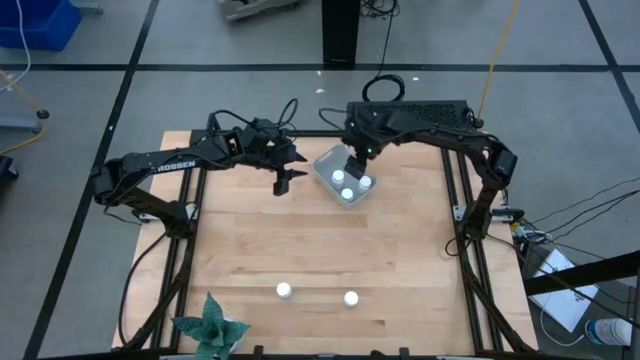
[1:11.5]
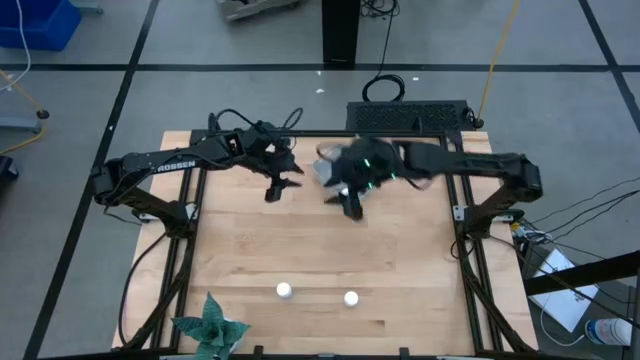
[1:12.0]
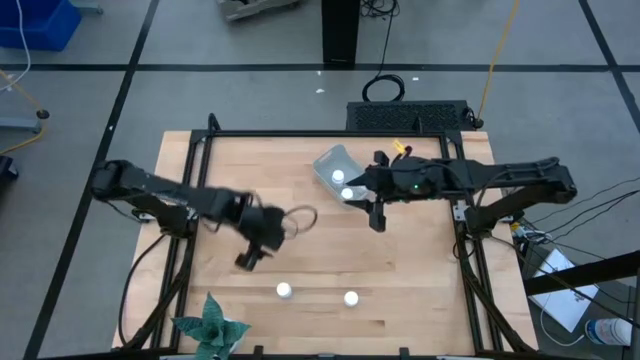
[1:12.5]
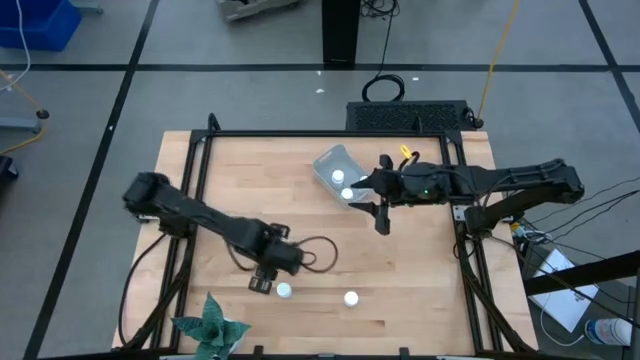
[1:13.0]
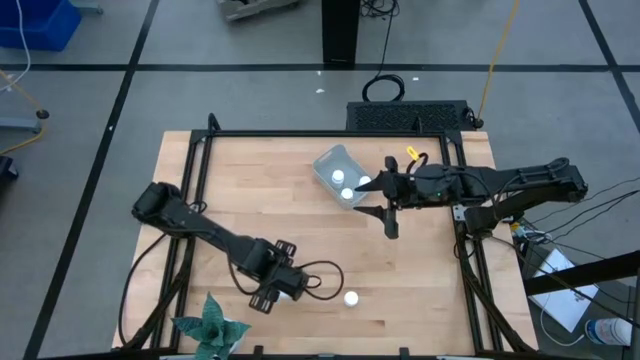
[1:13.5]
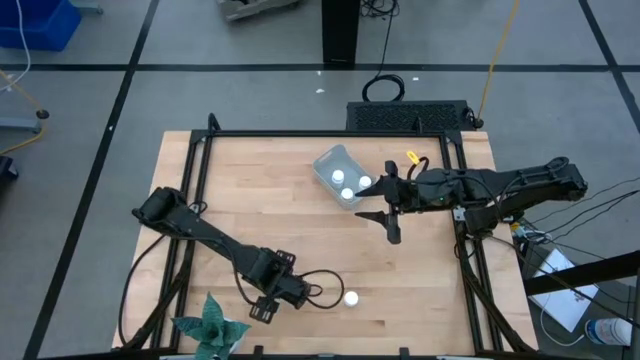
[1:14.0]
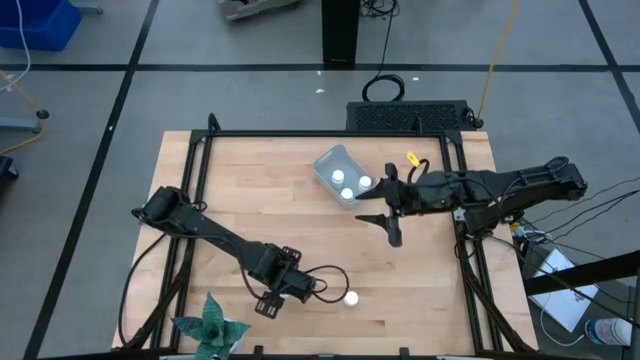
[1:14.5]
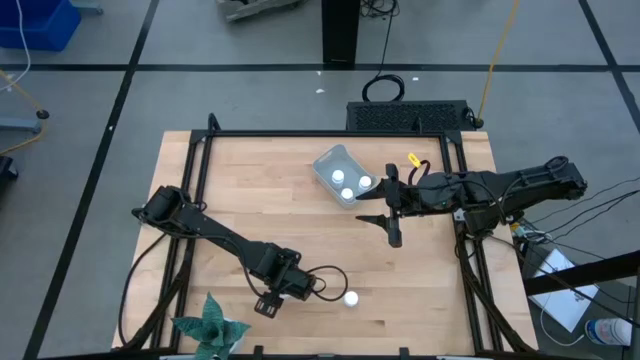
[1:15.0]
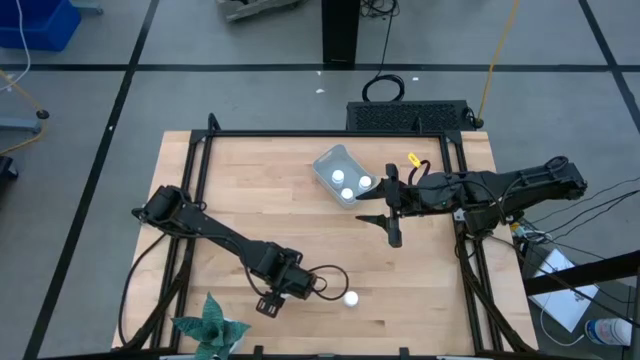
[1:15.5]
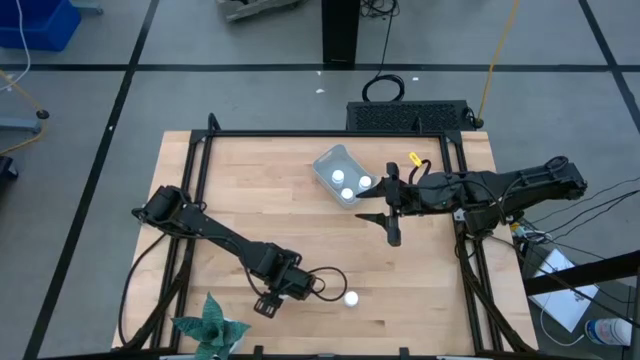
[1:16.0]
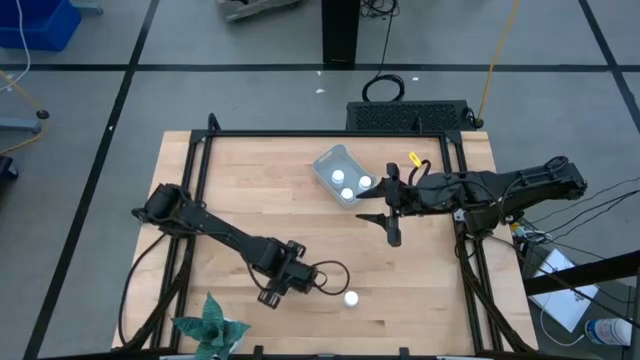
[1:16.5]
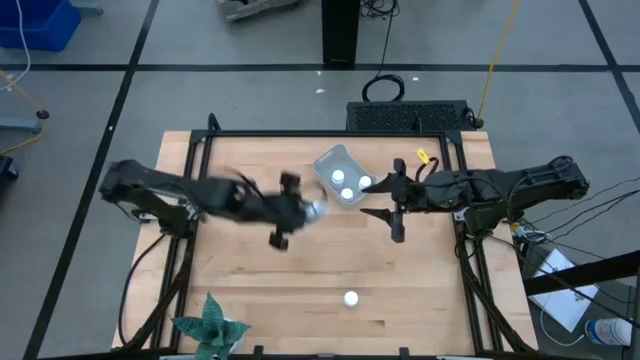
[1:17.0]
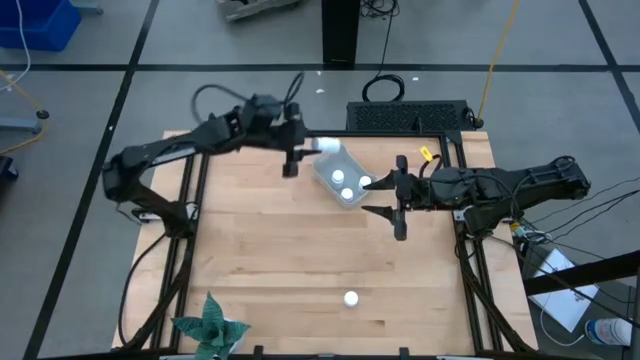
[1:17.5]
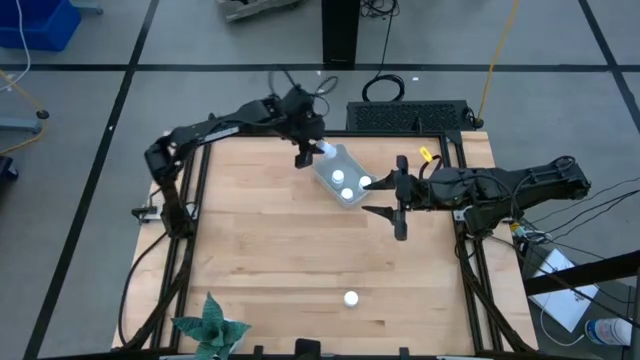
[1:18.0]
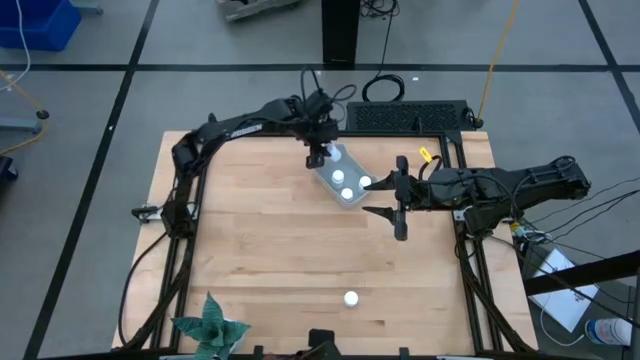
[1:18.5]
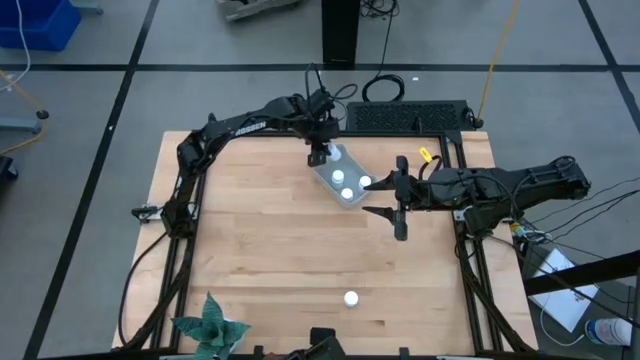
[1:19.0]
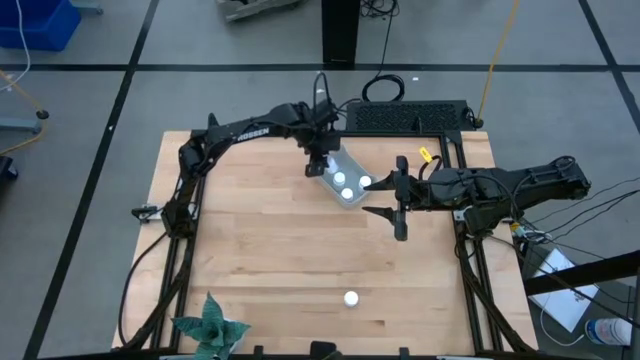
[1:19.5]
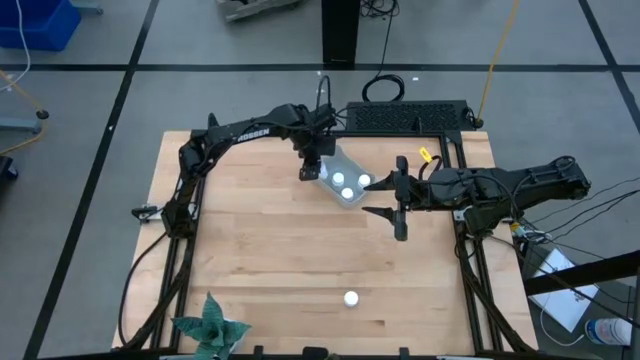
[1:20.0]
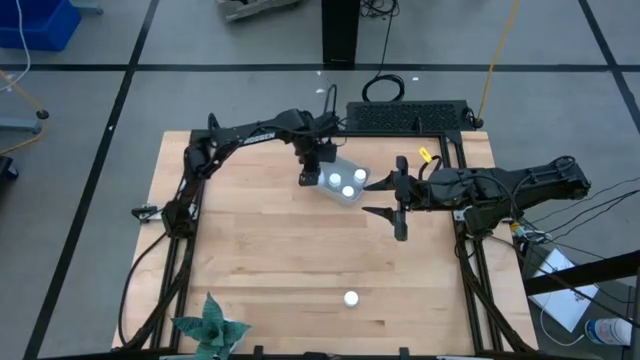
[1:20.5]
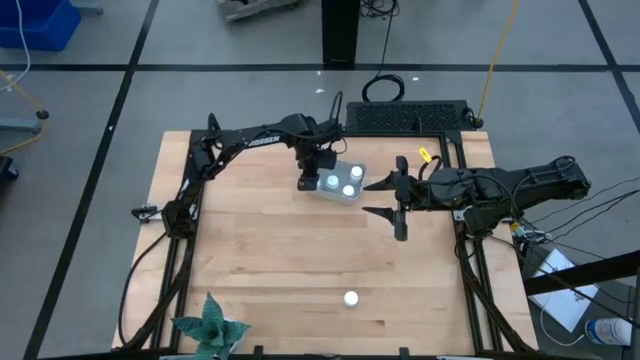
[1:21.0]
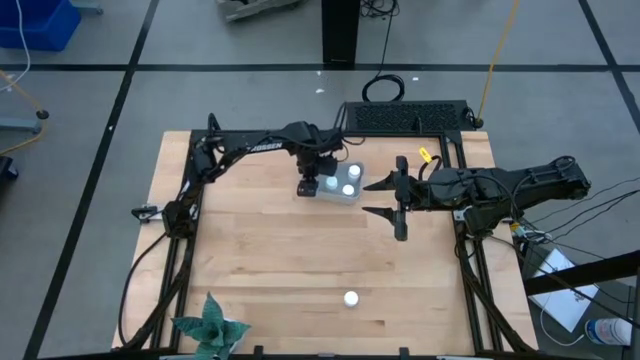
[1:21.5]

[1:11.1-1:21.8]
Task: Pick and place pill bottles into a basket
Put the white pill bottle into the gray bin

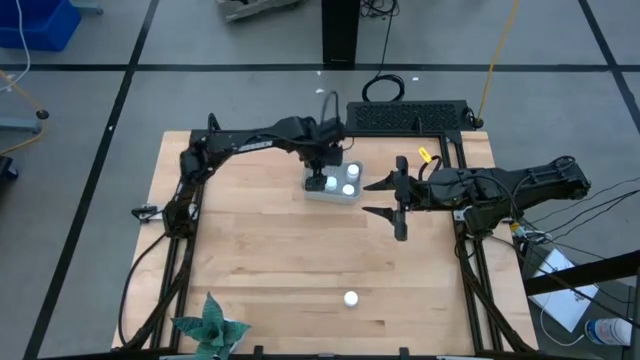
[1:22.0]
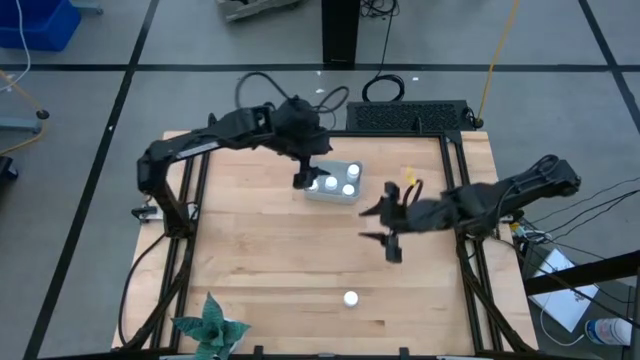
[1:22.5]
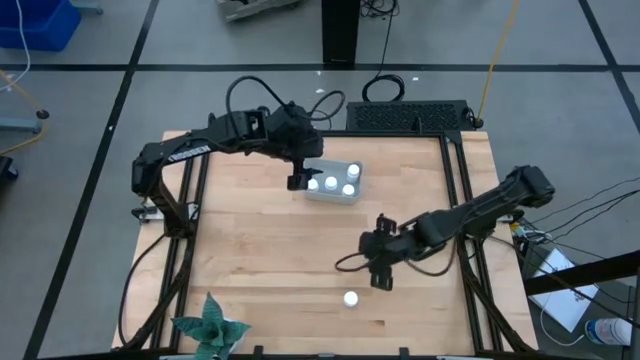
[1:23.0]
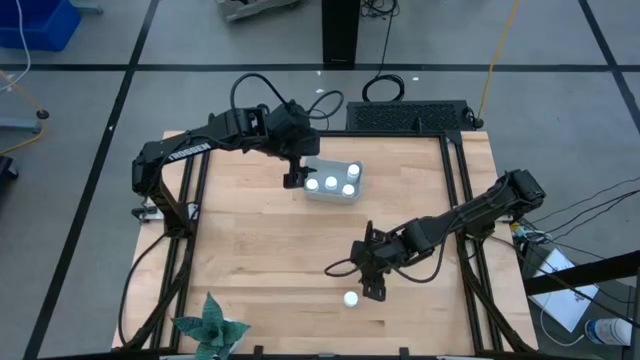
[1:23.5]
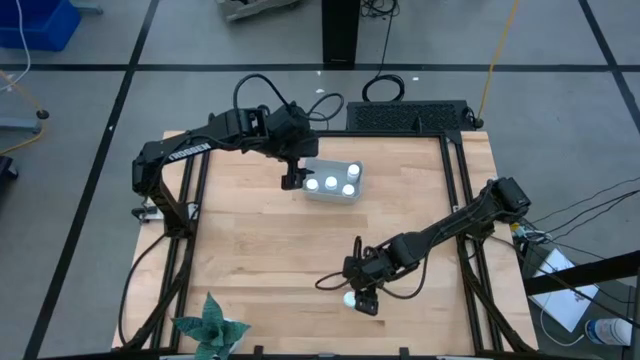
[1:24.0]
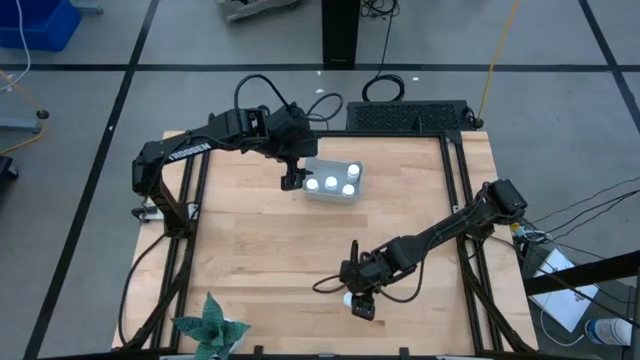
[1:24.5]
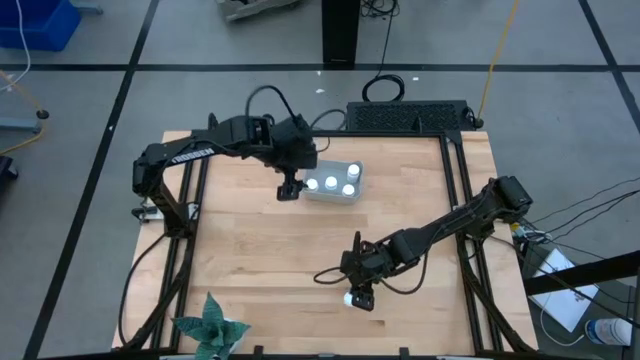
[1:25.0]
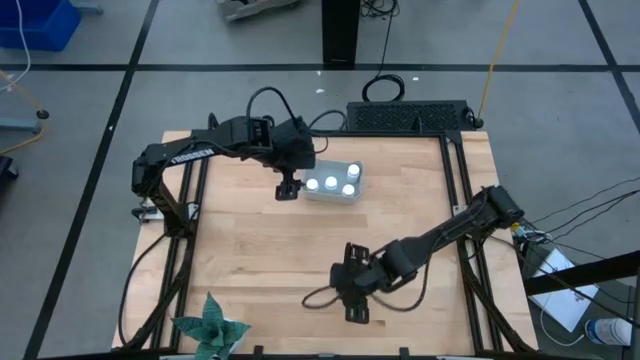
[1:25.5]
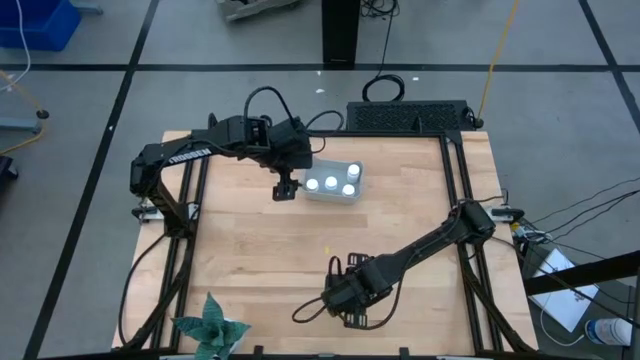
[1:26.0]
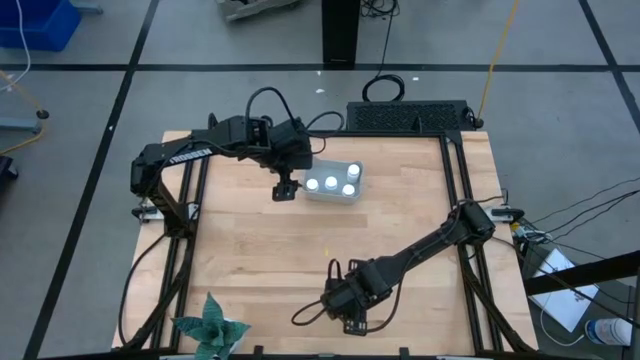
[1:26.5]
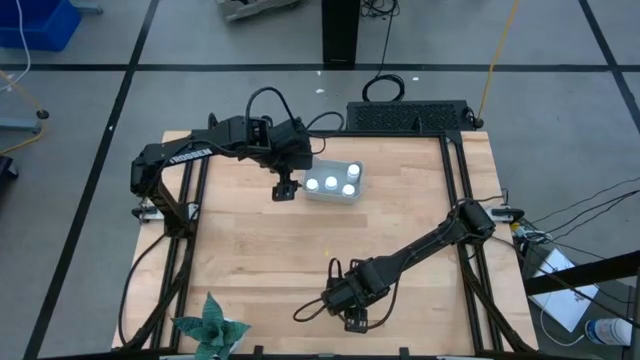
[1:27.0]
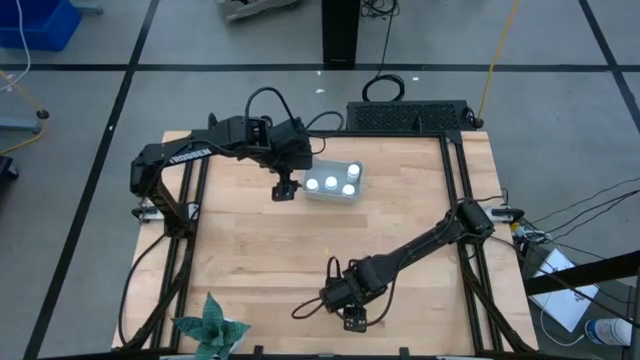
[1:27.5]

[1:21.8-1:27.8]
Put the white pill bottle into the gray bin

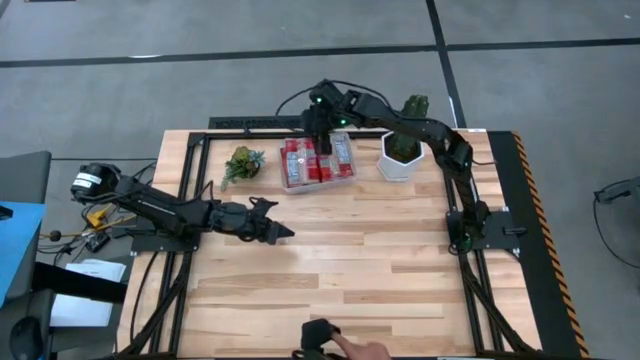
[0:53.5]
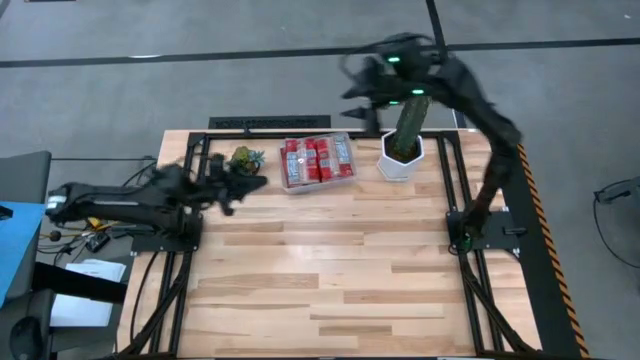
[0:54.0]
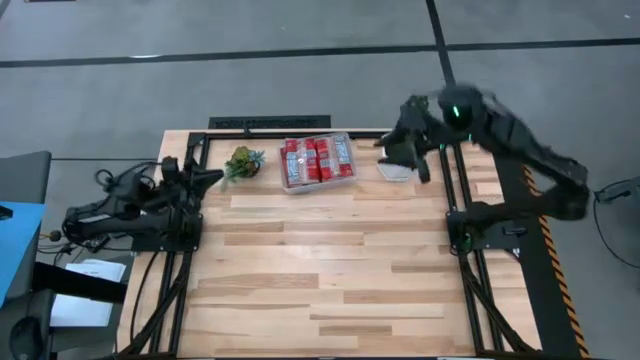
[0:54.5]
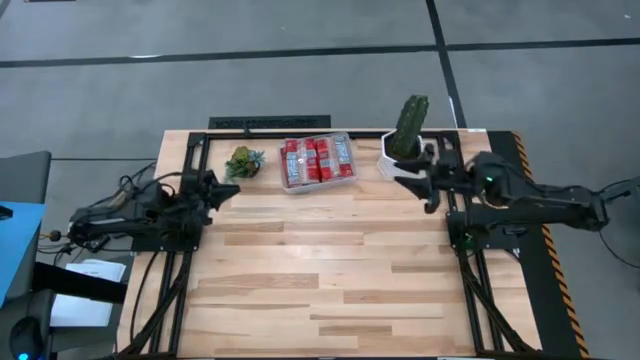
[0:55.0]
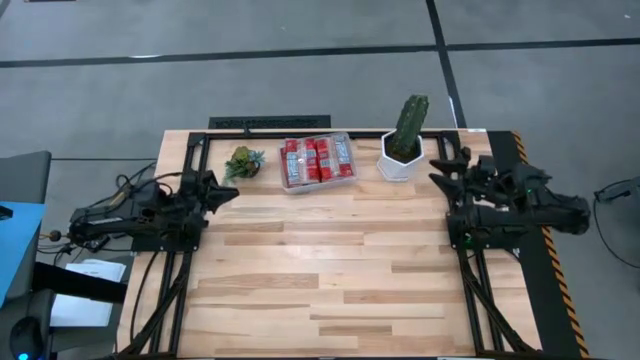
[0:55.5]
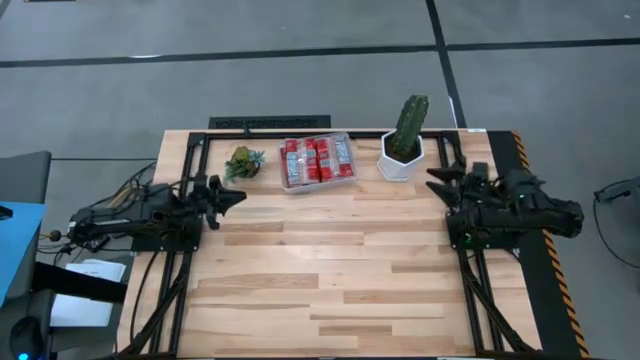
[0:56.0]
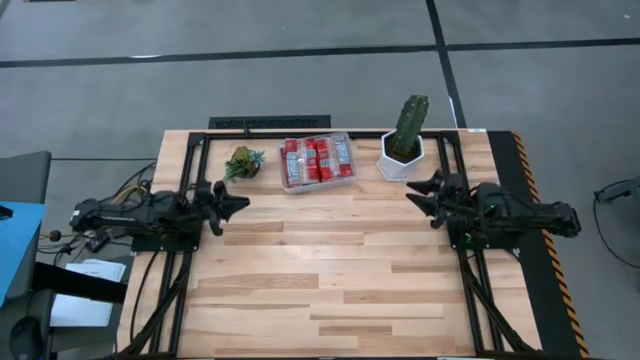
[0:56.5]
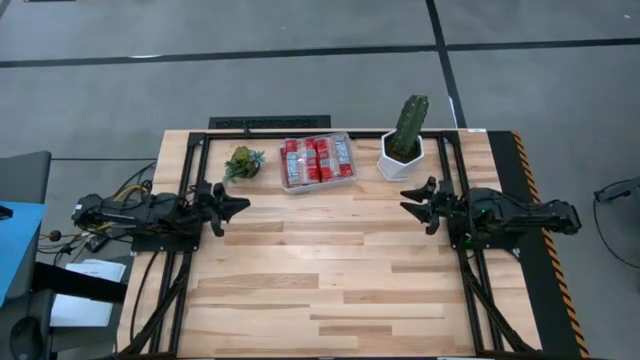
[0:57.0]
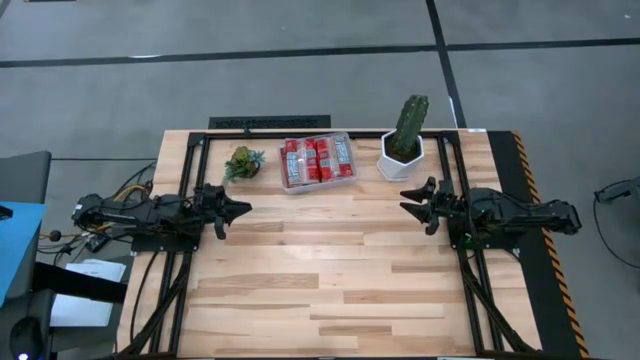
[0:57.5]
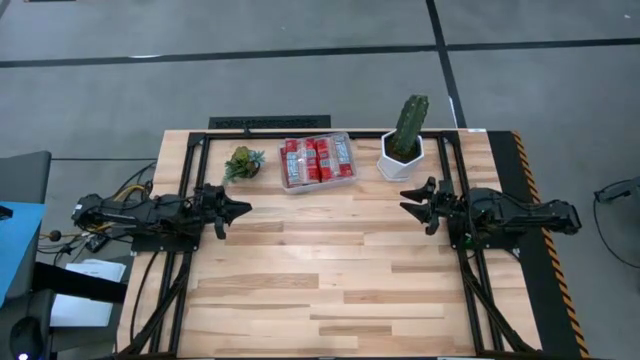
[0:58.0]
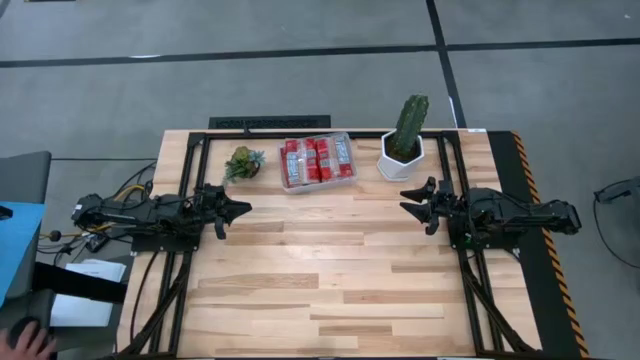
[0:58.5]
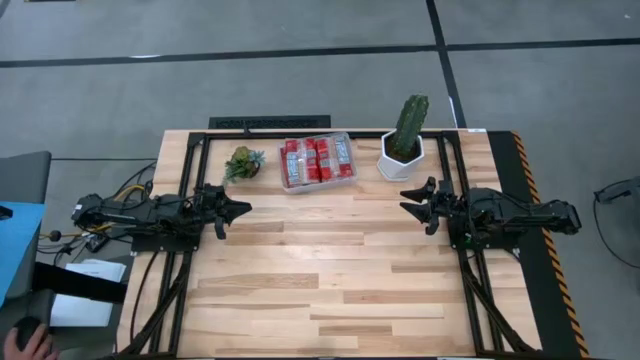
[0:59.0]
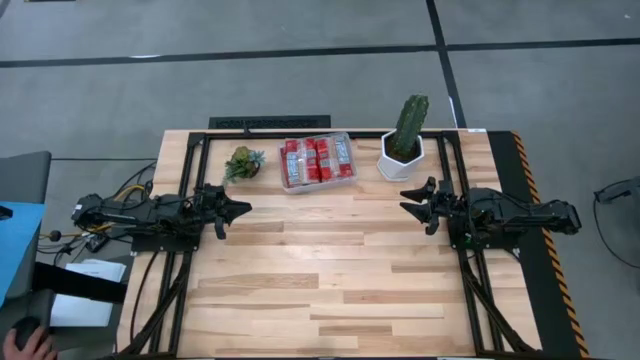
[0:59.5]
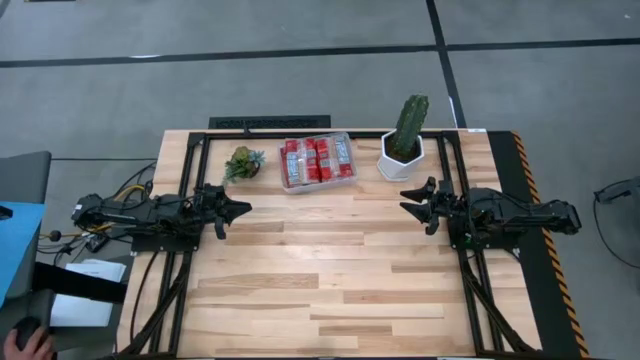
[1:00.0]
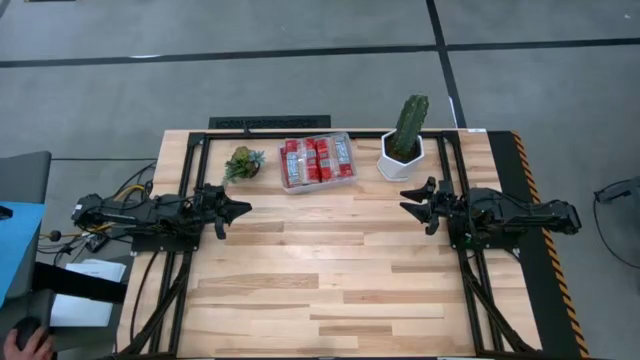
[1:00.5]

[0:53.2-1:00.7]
Task: Sort popcorn bags into baskets
Return to Home Position
